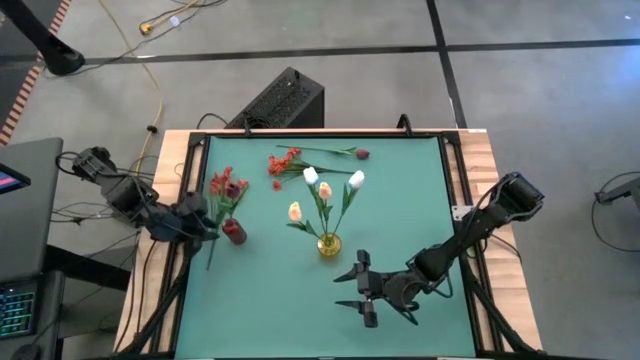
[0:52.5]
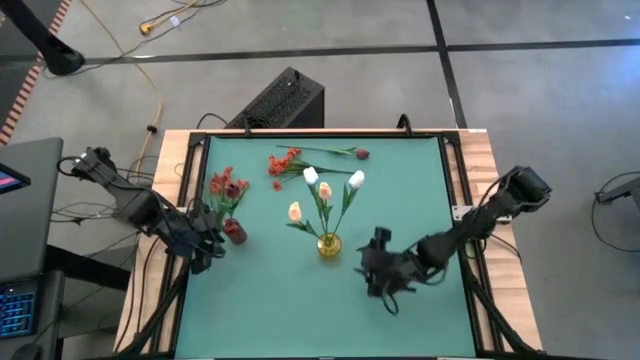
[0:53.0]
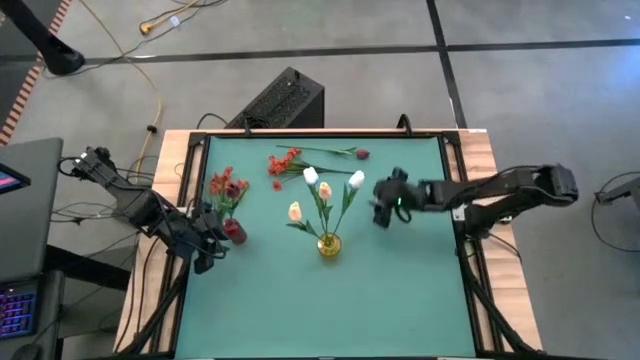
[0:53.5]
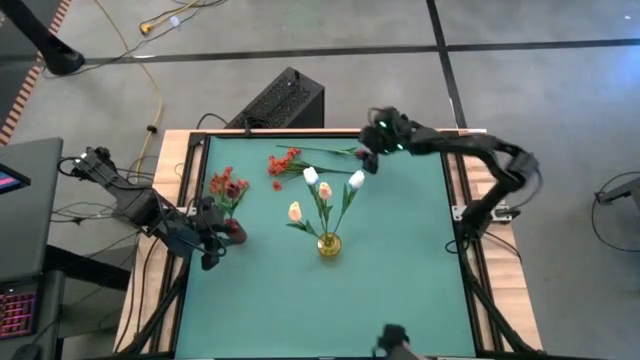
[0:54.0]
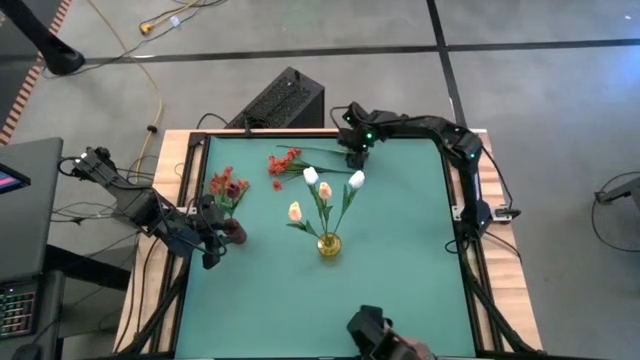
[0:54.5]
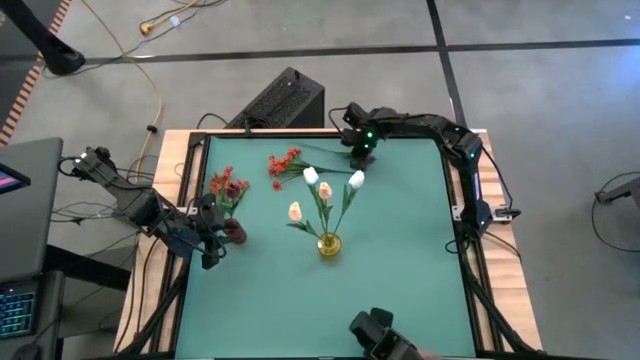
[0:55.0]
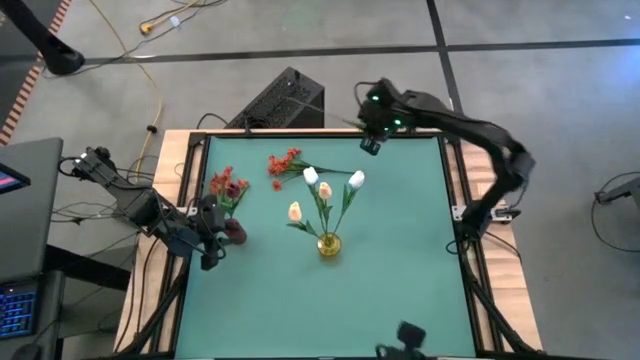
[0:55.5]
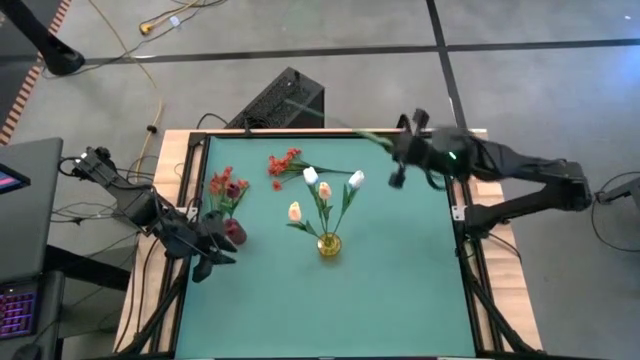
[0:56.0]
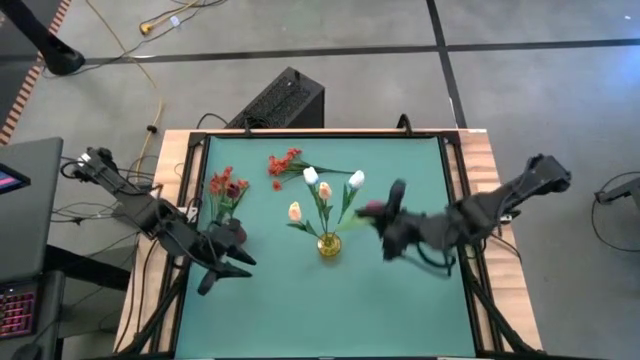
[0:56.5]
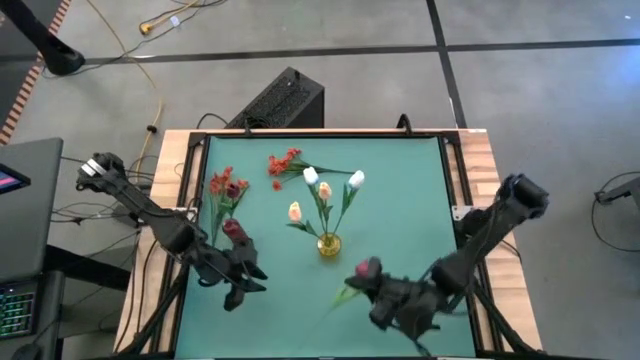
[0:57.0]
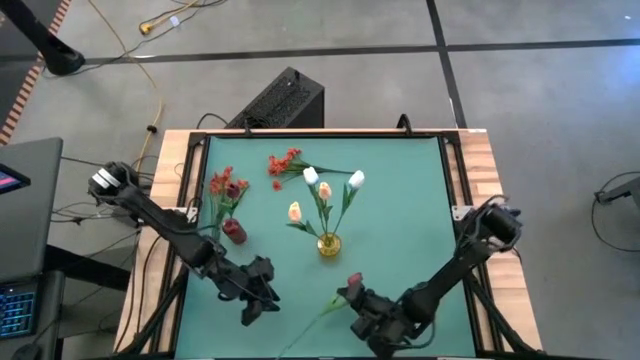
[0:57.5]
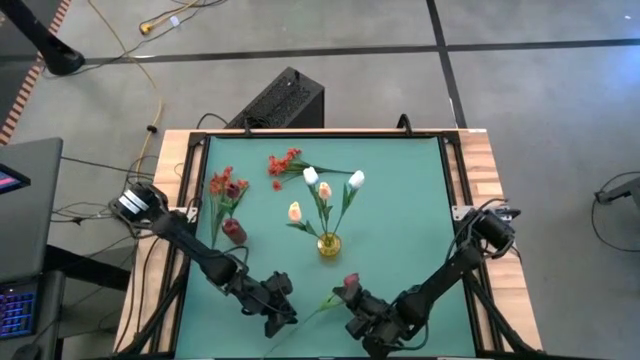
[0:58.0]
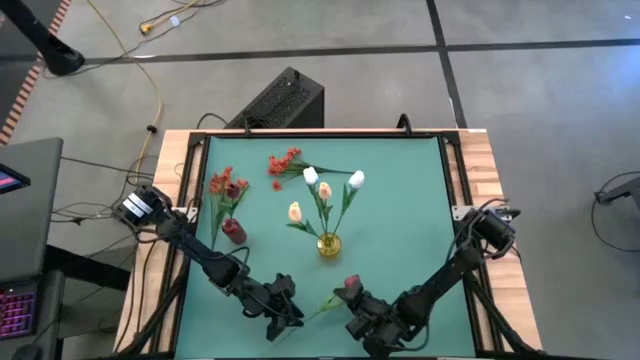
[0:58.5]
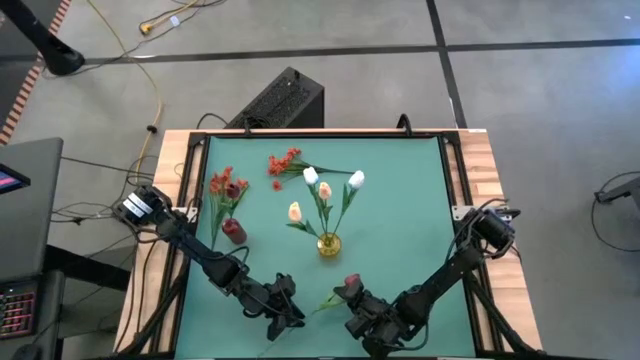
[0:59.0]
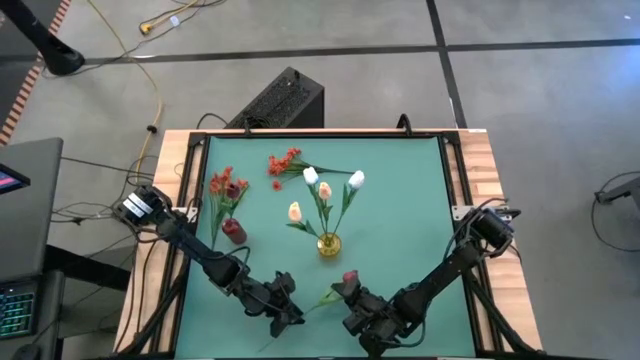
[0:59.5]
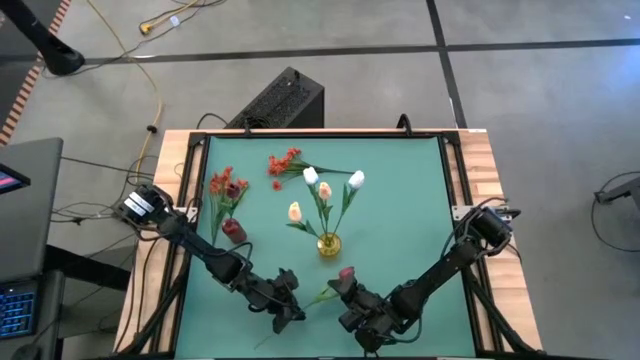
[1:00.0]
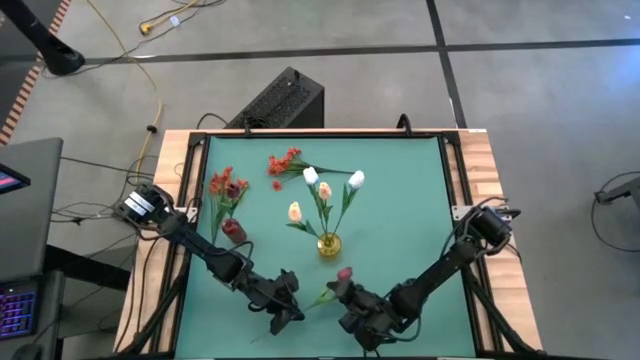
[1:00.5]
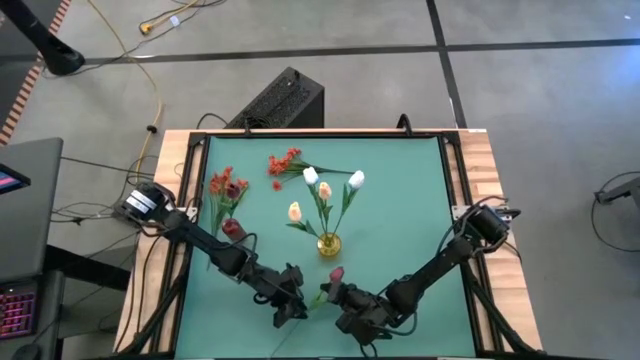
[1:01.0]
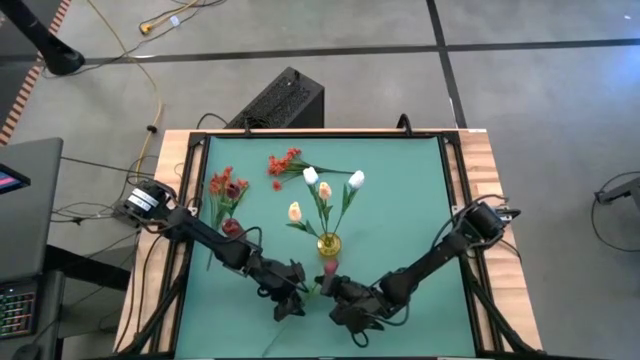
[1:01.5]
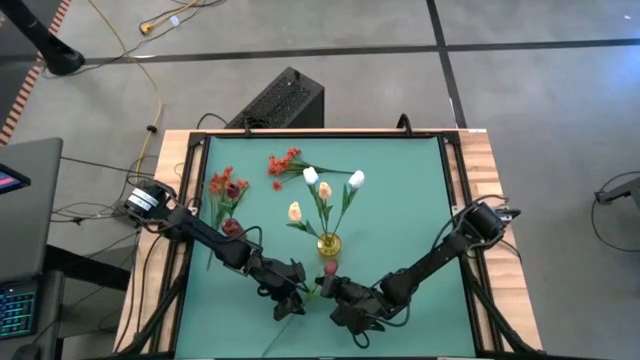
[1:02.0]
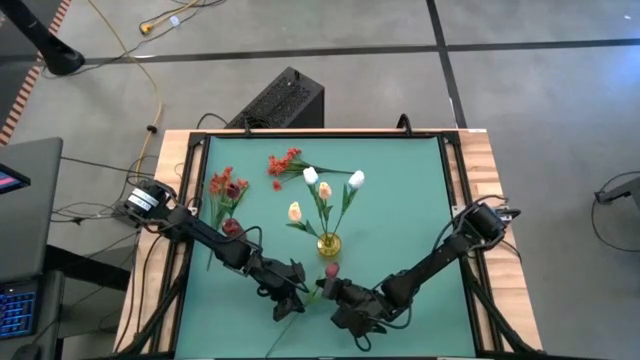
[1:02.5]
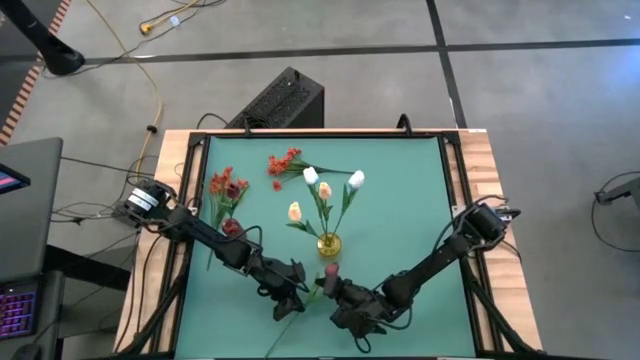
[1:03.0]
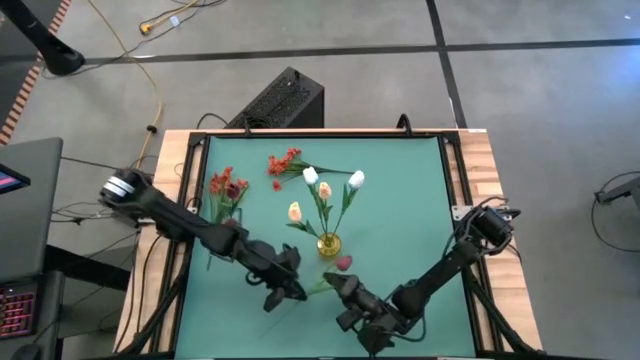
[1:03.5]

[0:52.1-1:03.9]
Task: Sort flowers into vase by color
Put the red flower into the red vase

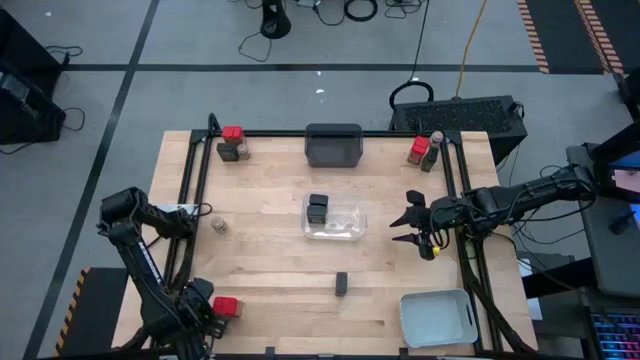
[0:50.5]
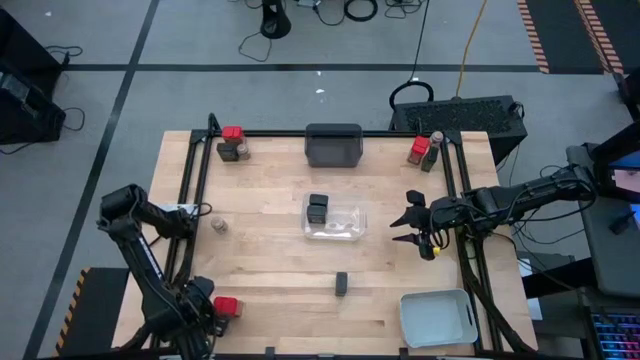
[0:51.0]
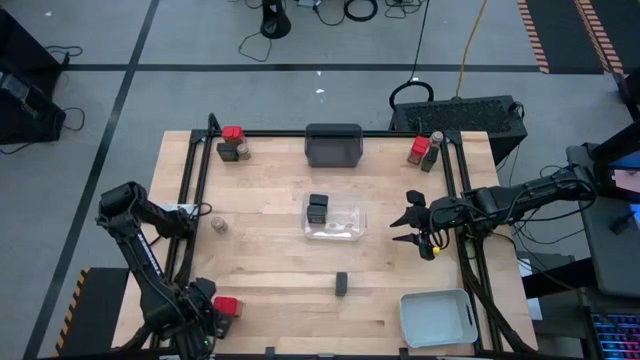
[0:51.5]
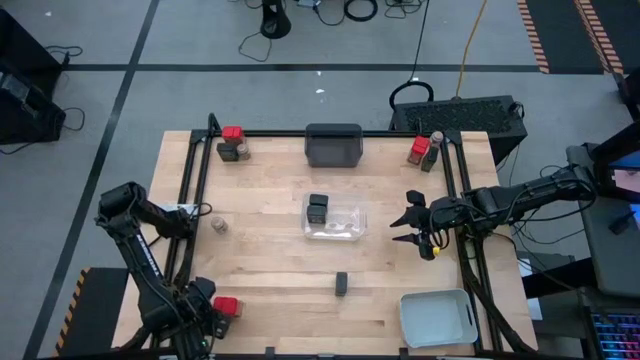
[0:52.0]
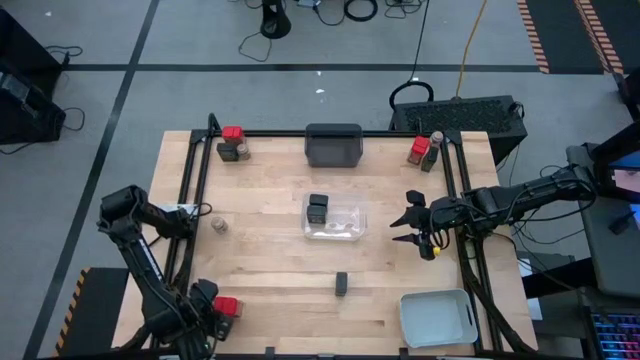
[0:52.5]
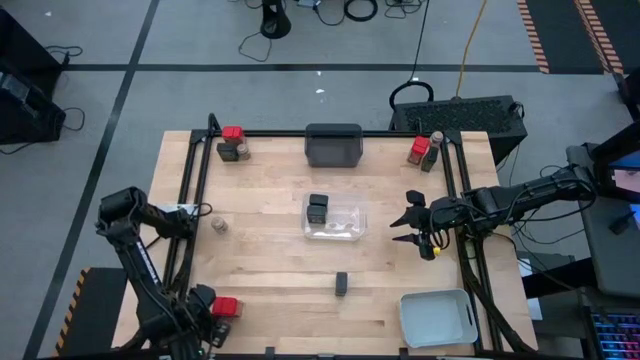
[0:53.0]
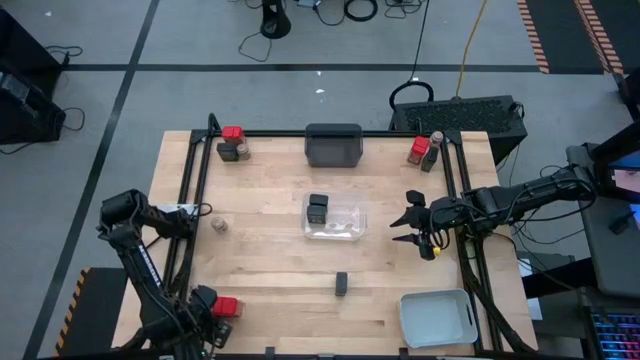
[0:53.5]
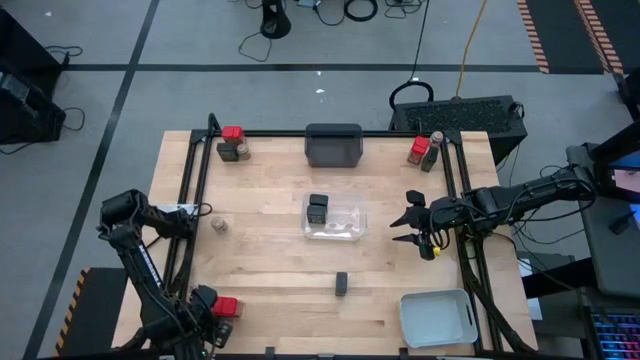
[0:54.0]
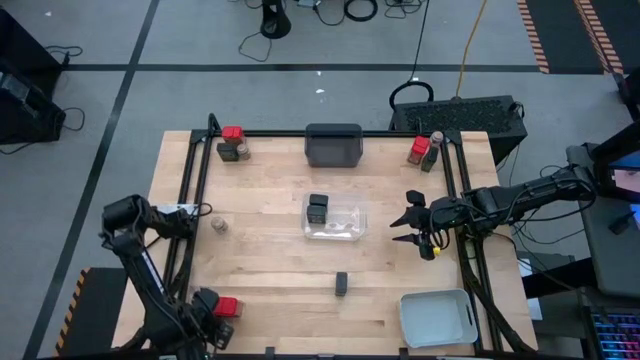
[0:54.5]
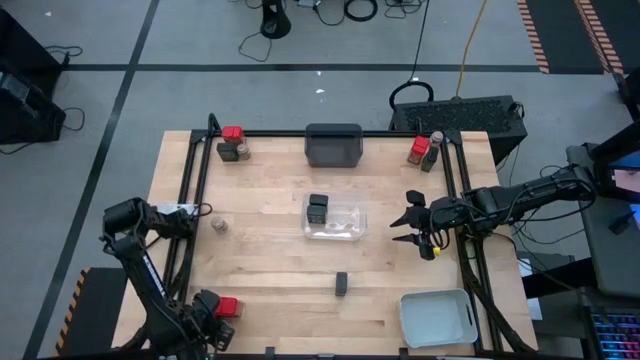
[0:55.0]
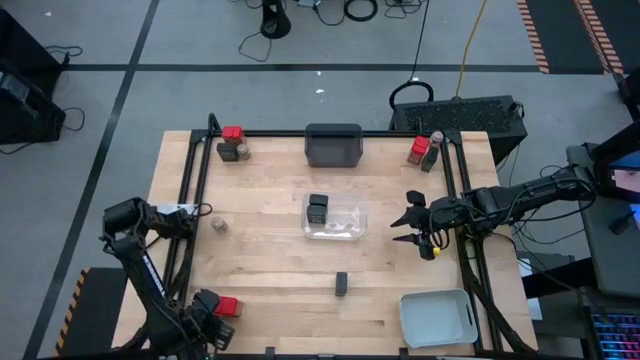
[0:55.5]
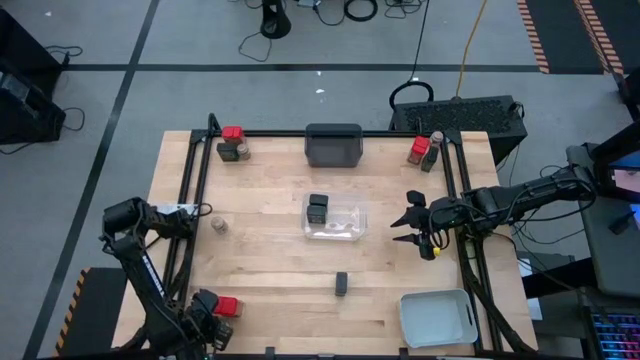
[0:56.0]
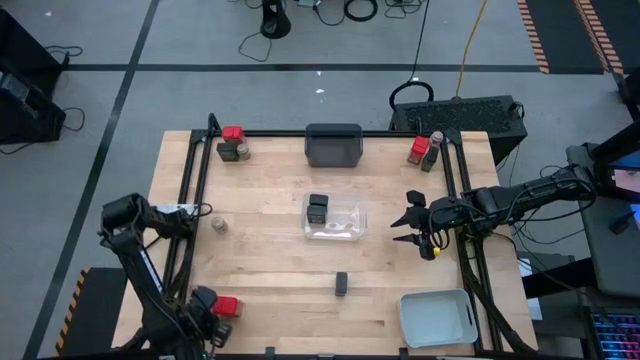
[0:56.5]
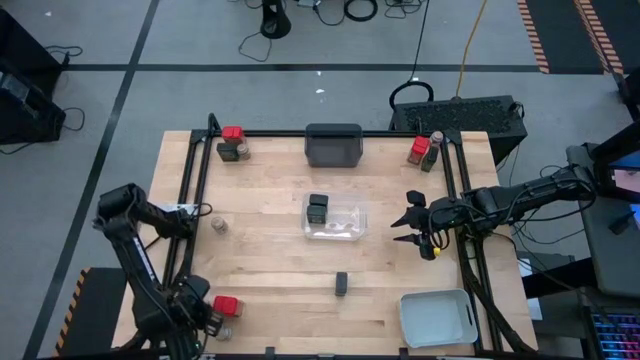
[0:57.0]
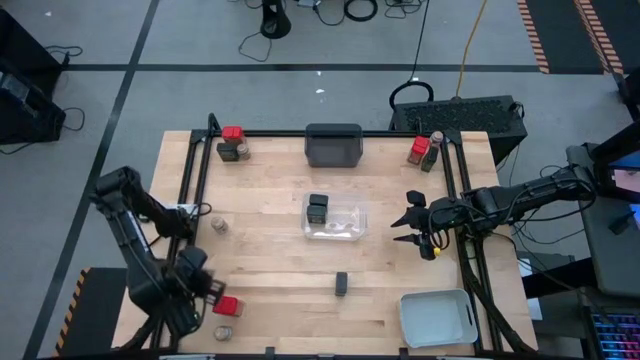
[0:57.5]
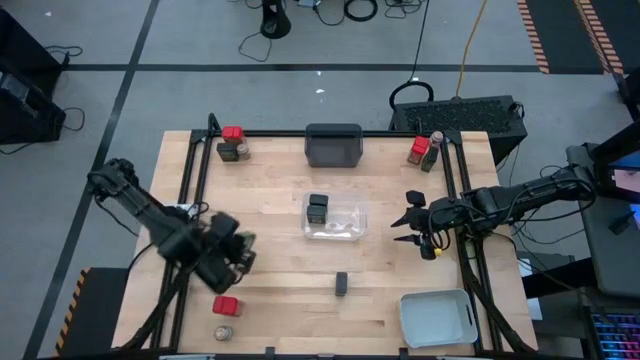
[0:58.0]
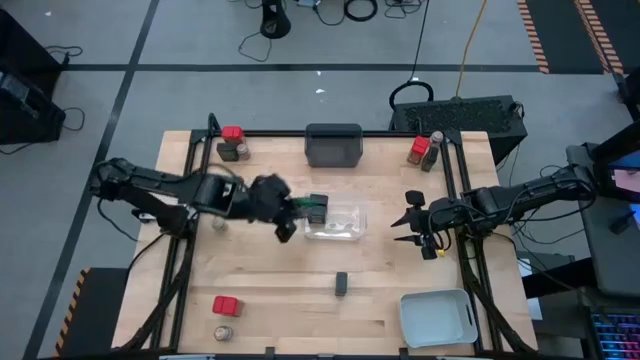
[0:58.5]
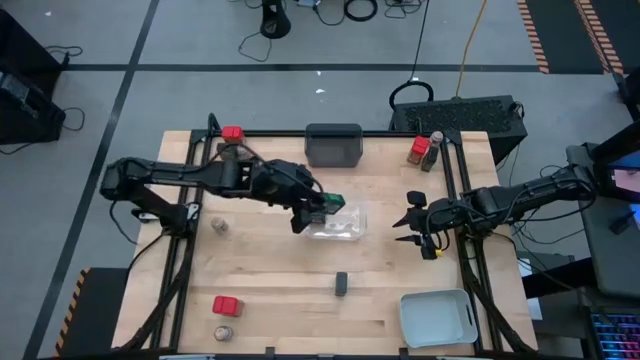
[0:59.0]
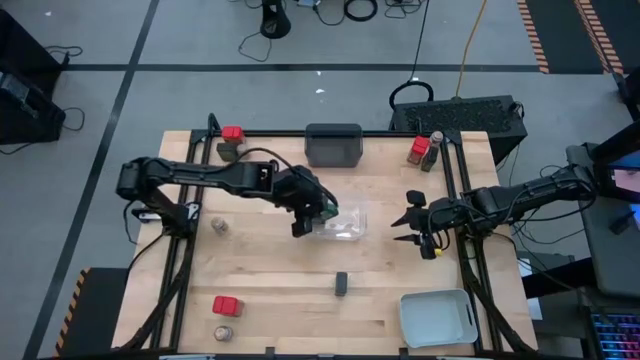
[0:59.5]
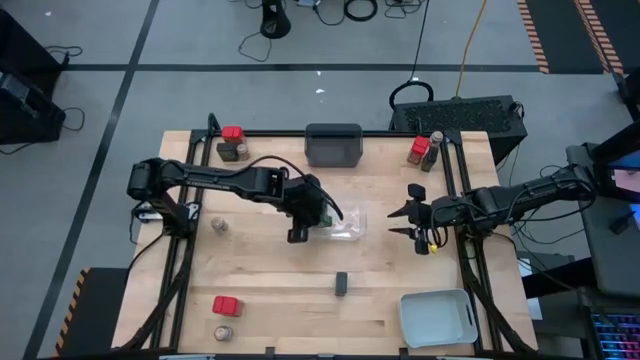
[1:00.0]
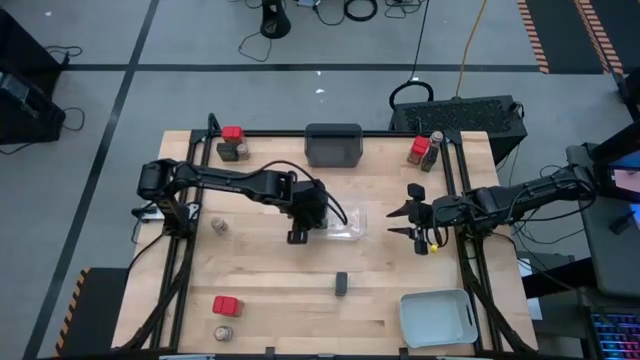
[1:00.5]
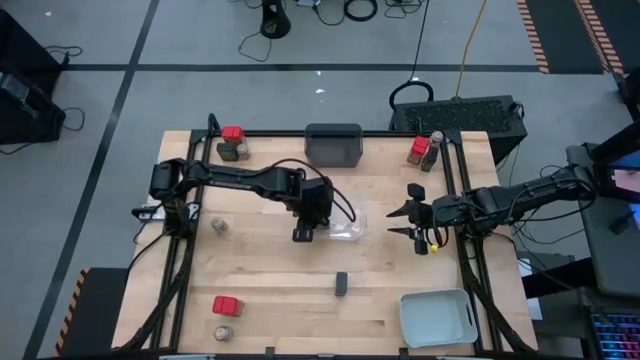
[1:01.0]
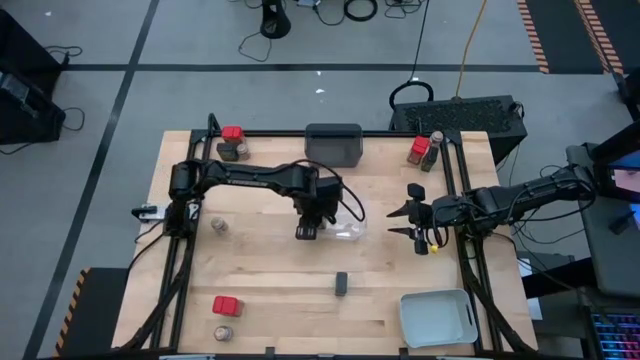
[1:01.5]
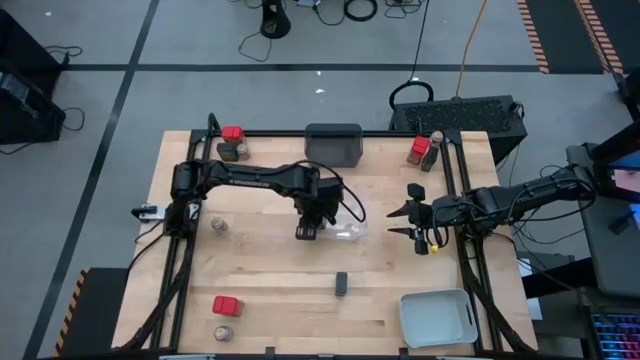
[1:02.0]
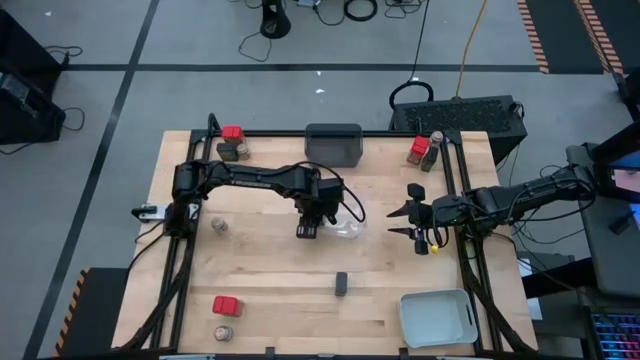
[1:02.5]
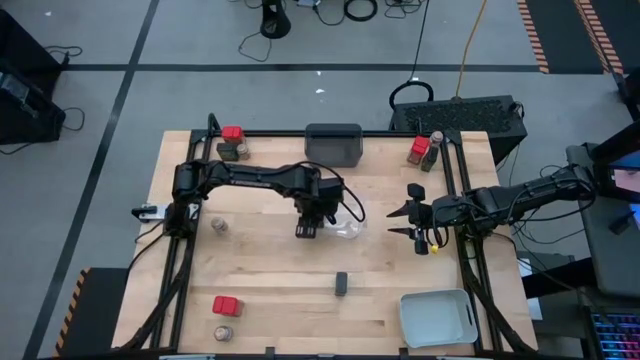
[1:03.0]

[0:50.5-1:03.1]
Task: Sort spices by type
Put the green seasoning bottle into the transparent bin
